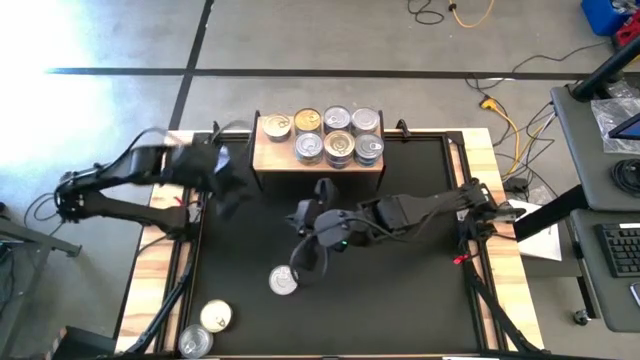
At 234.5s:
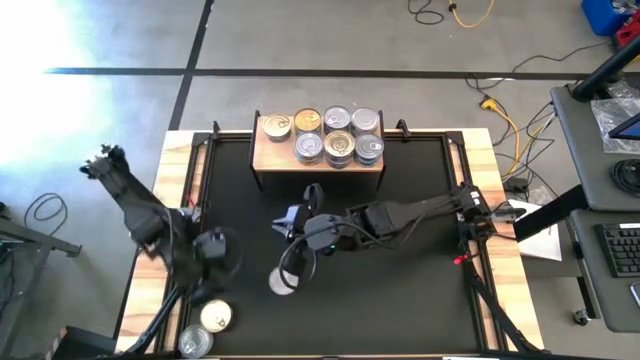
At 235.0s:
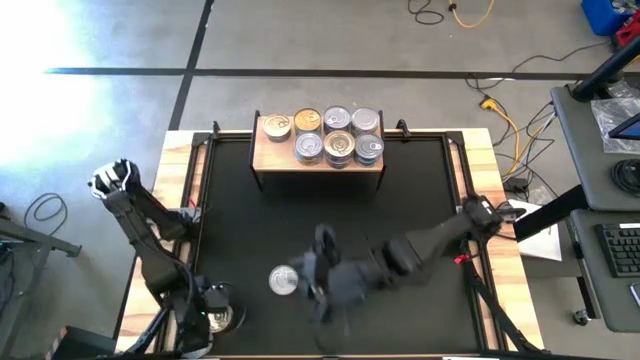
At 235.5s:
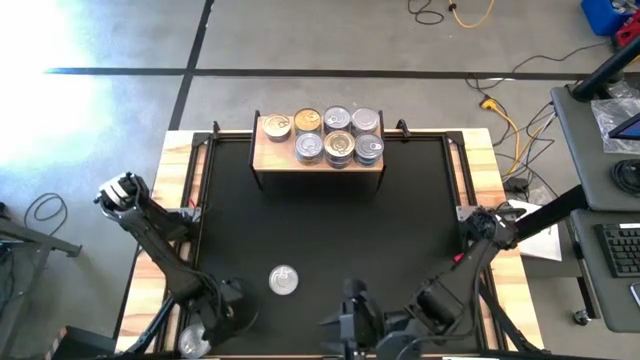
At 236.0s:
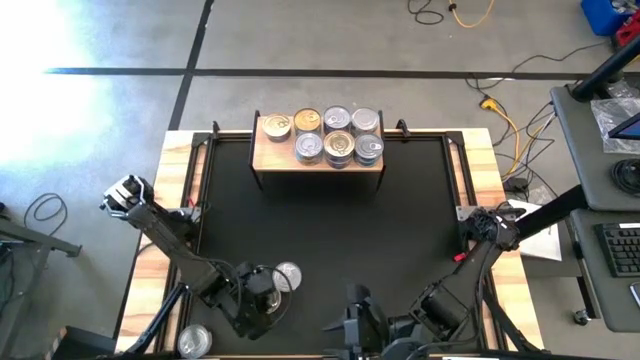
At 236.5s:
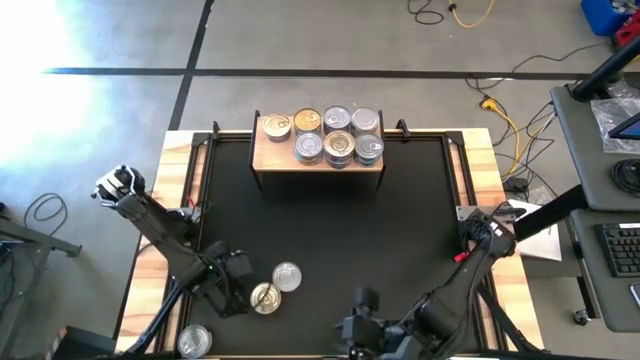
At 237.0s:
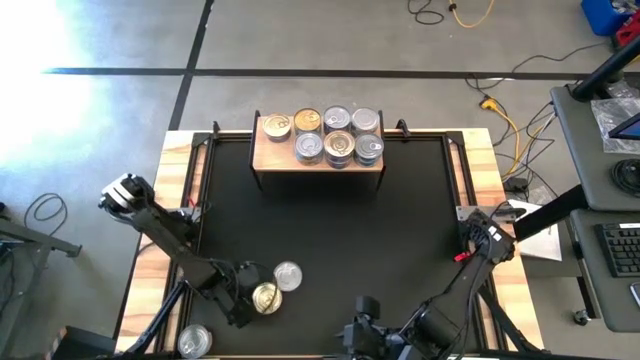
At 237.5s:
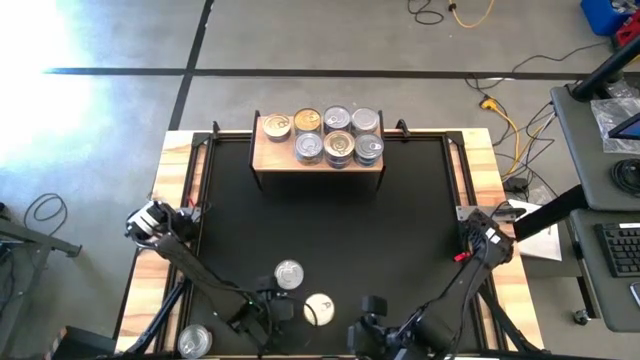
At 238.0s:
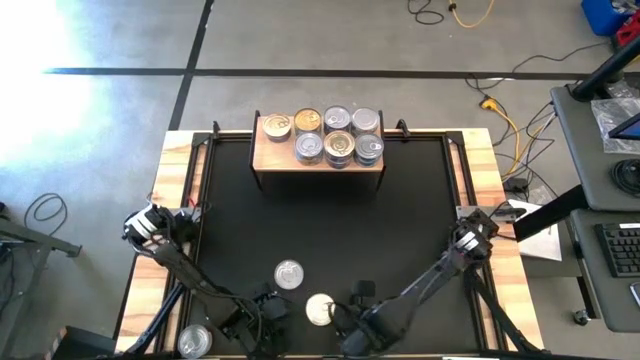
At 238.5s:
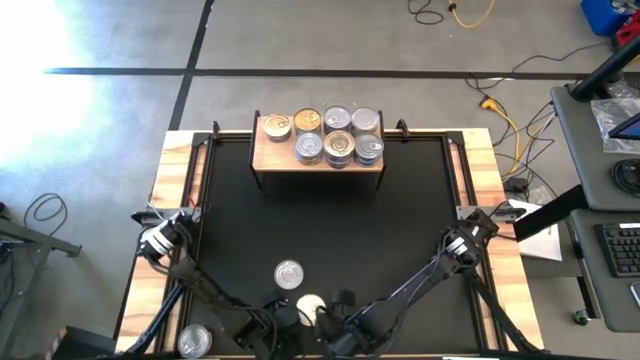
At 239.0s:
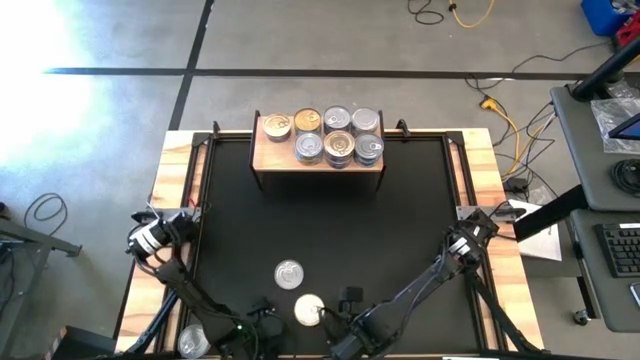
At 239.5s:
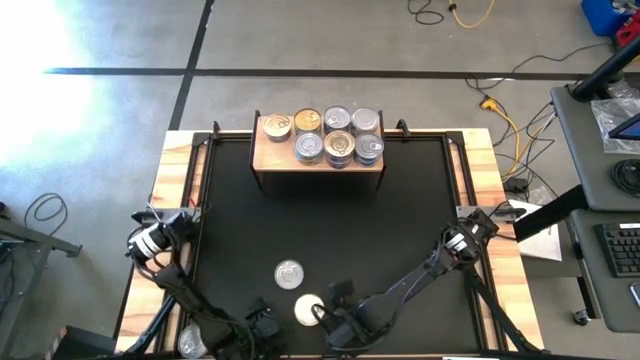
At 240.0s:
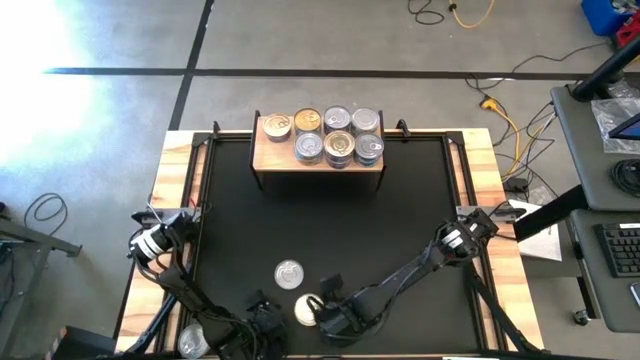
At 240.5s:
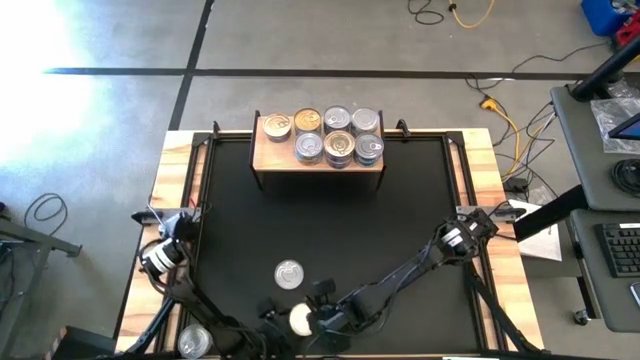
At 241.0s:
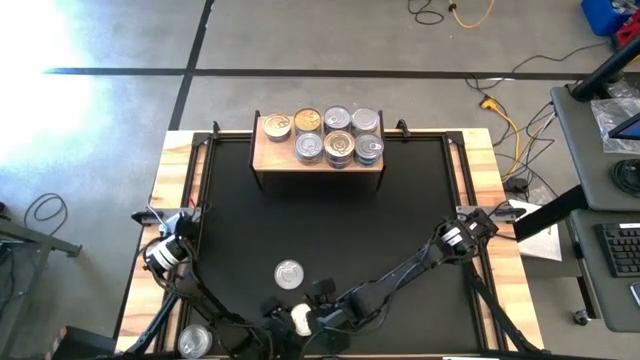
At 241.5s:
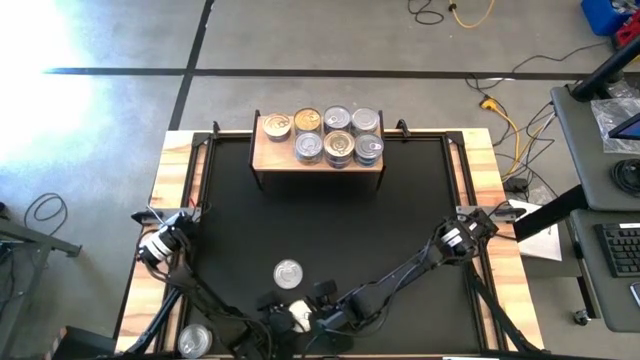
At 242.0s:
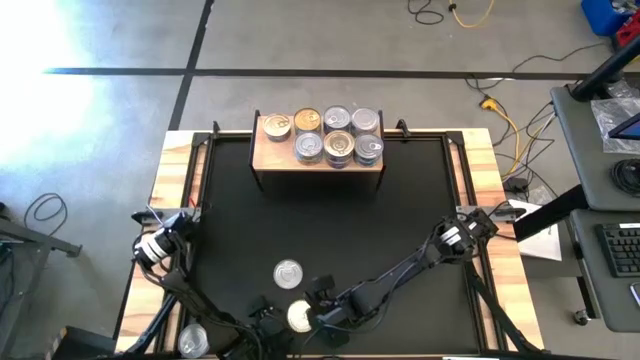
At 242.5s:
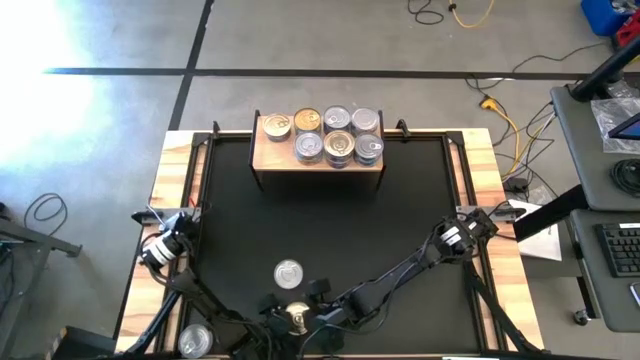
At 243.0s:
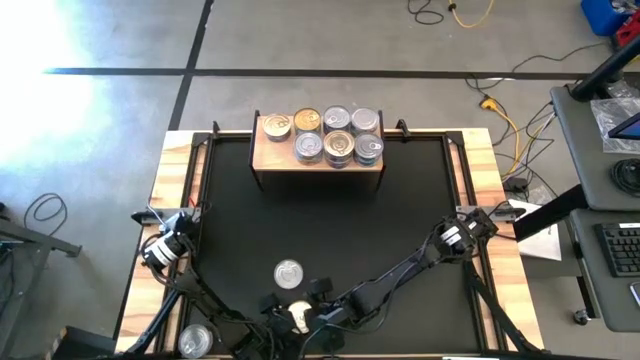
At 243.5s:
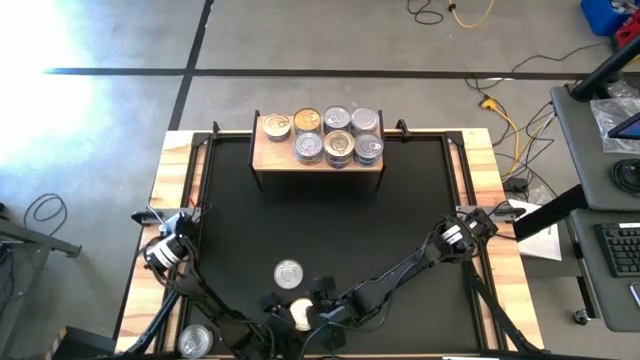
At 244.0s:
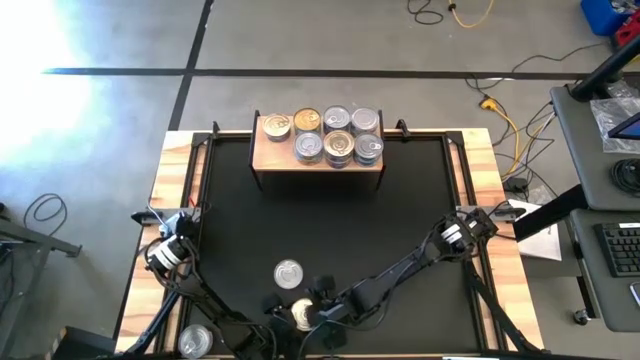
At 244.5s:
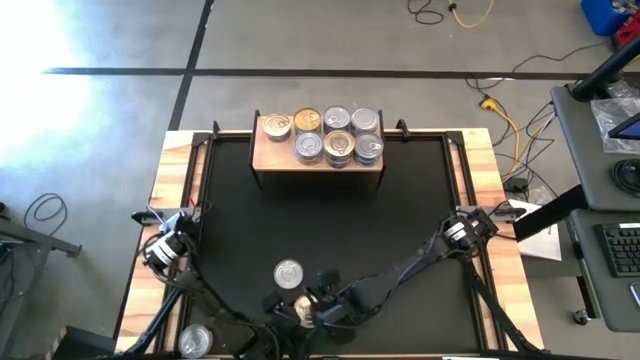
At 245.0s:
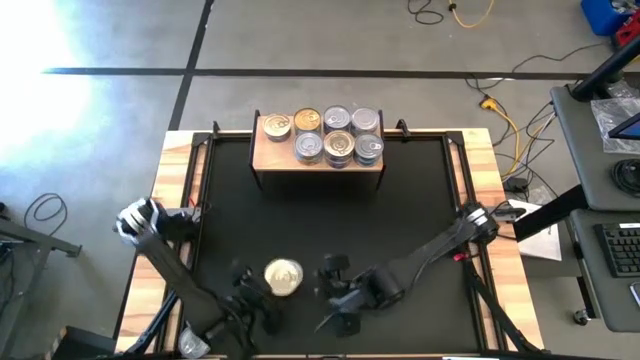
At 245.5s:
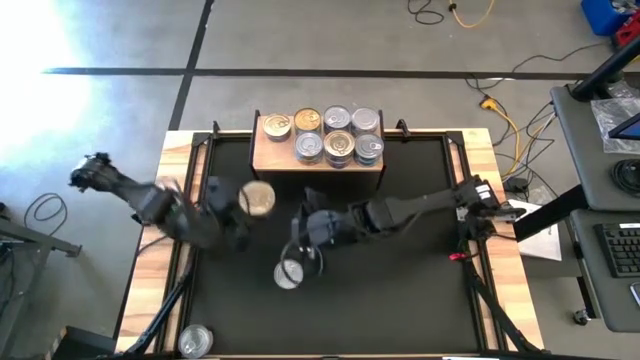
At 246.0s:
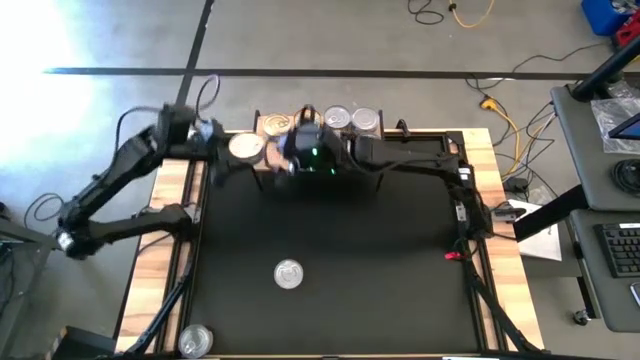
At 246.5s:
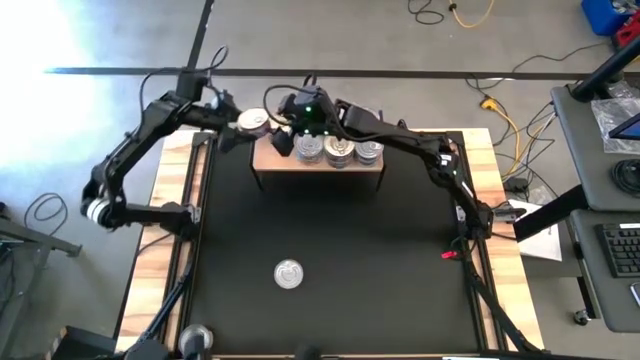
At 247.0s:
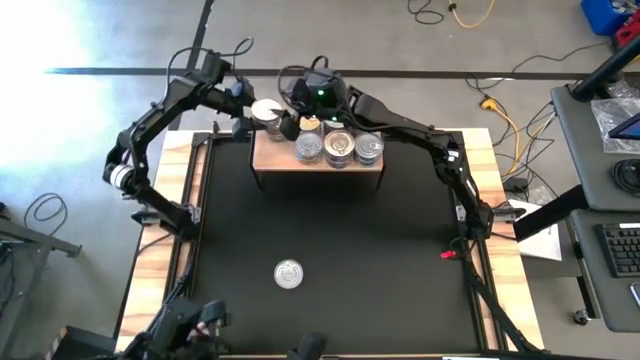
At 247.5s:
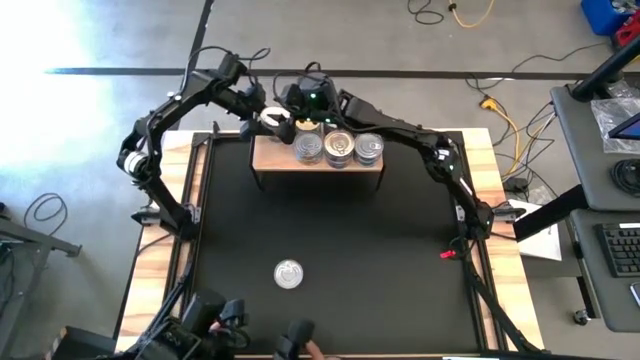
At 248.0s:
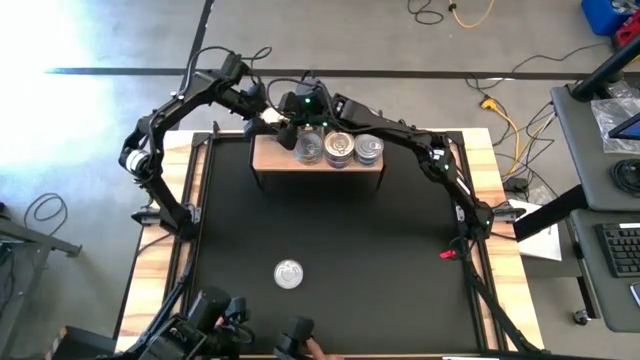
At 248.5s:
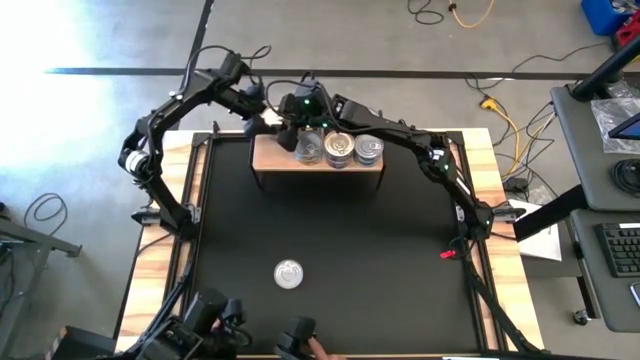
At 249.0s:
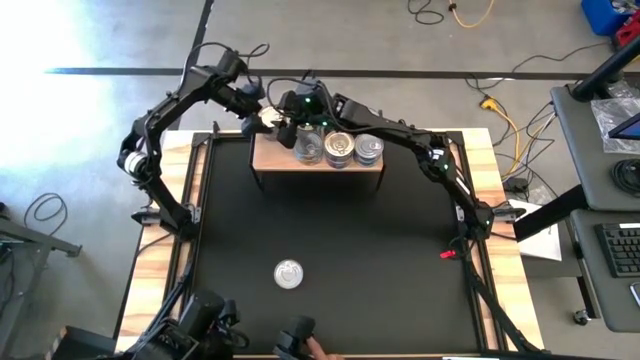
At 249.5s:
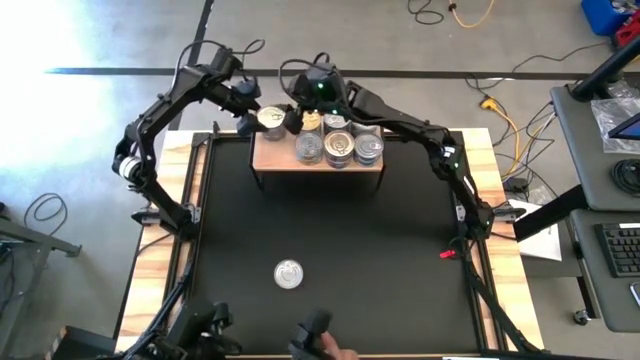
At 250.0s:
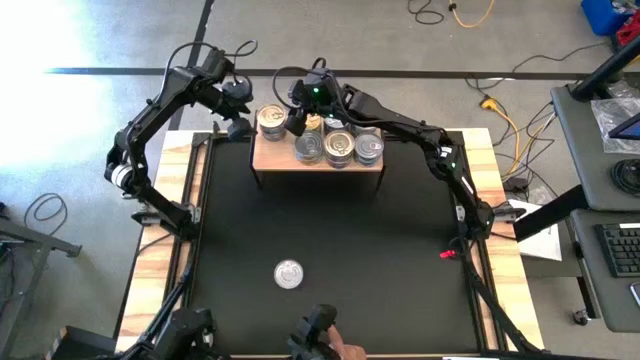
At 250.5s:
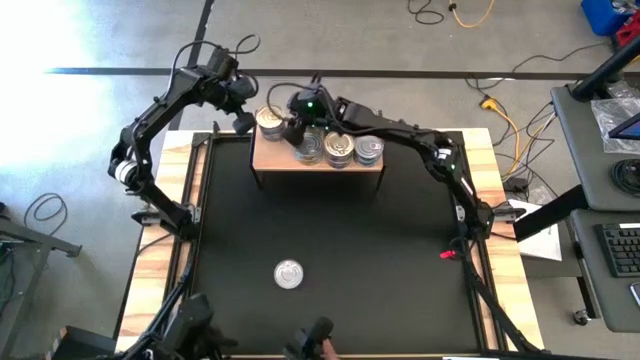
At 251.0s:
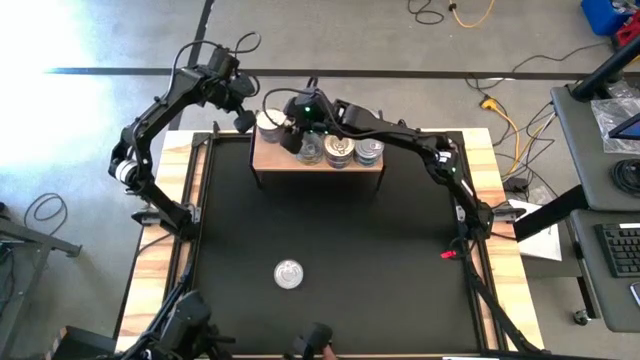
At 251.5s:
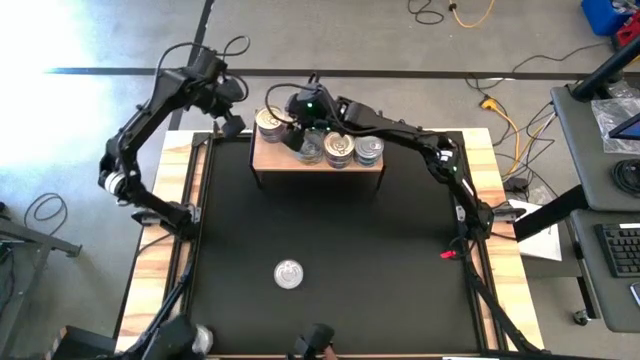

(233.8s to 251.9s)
Task: Stack canned seafood by type on shelf
Stack the pink tuna can on the pink tuna can on the shelf

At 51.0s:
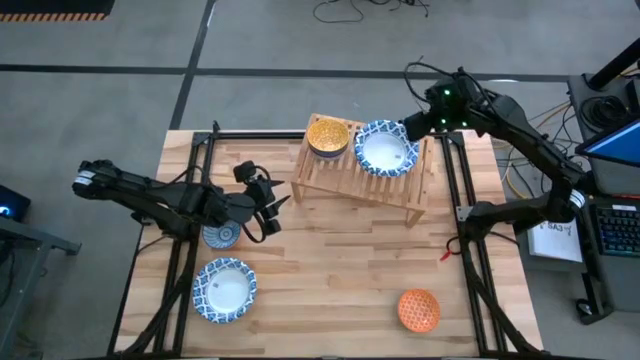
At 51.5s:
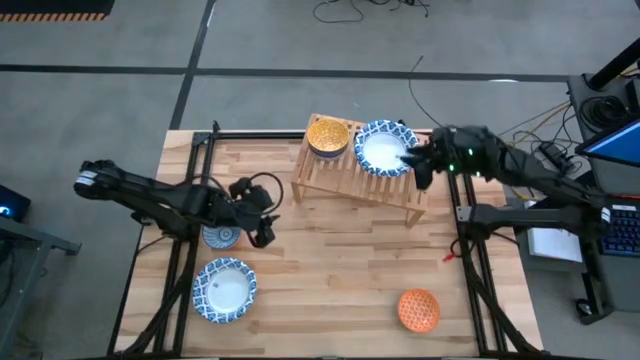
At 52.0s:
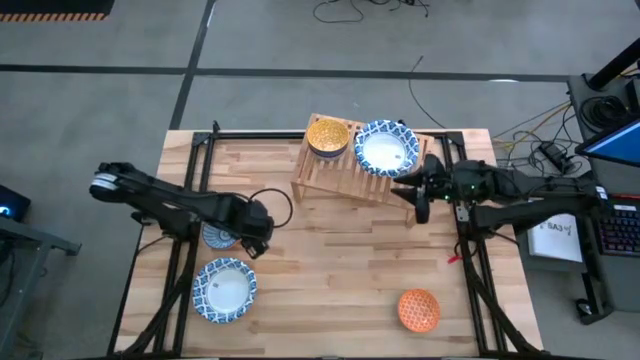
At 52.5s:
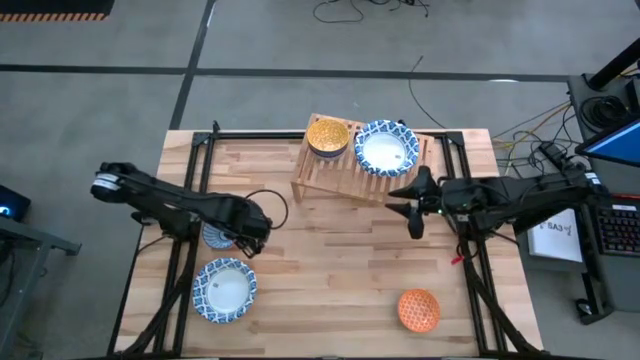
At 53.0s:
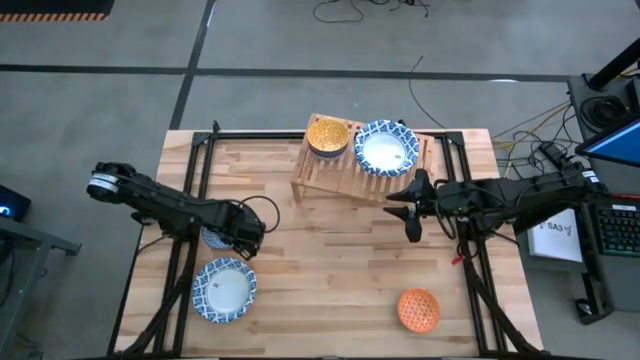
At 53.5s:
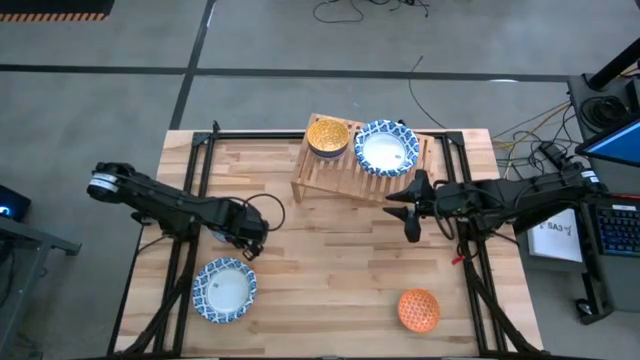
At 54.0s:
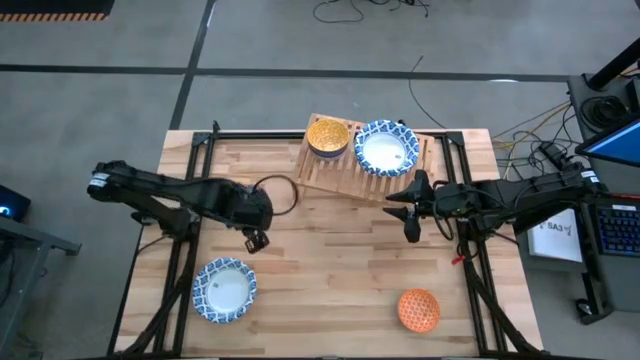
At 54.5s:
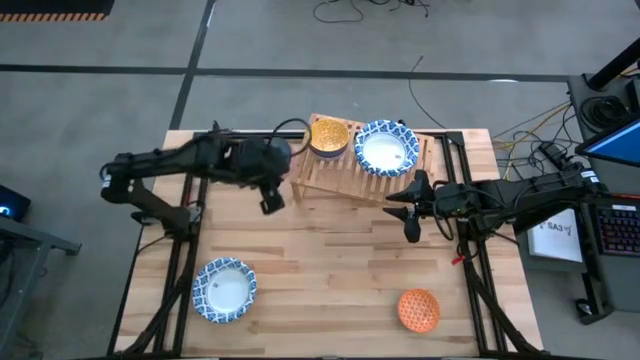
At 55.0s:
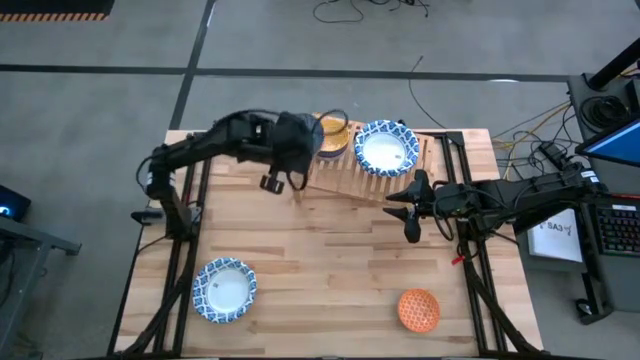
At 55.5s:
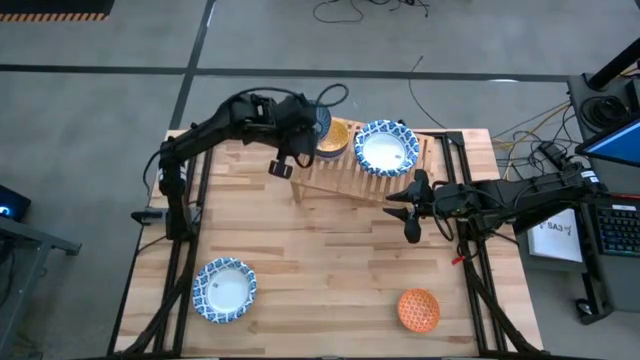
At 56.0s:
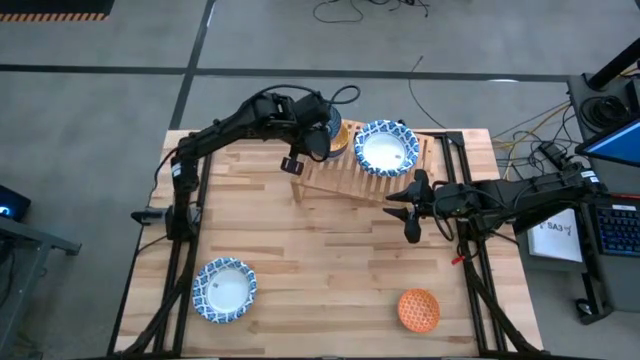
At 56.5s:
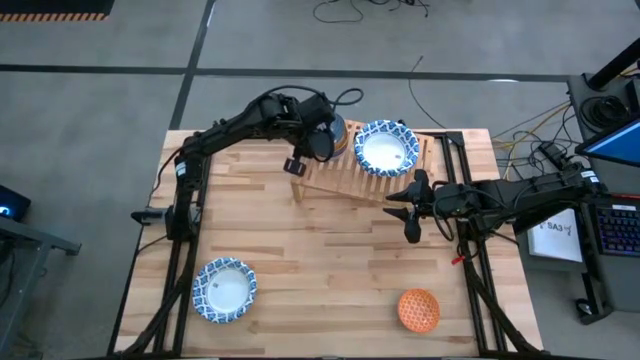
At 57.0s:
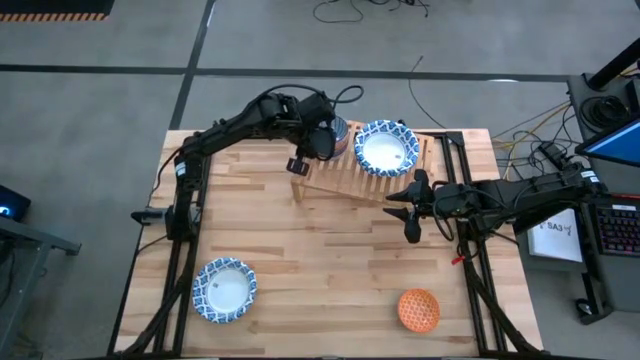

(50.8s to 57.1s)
Task: Place and stack bowls onto a shelf
Stack the blue pattern bowl on top of the yellow pattern bowl
